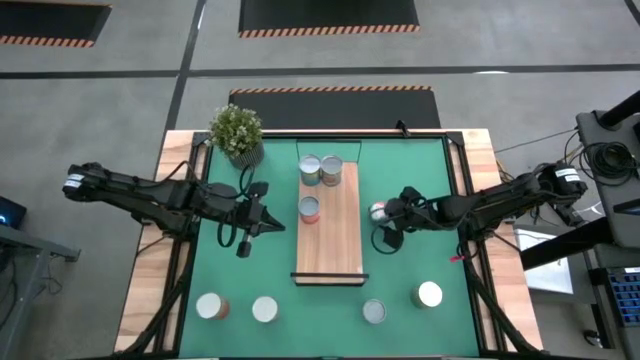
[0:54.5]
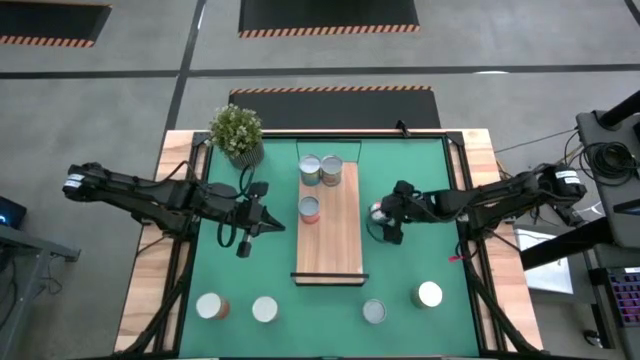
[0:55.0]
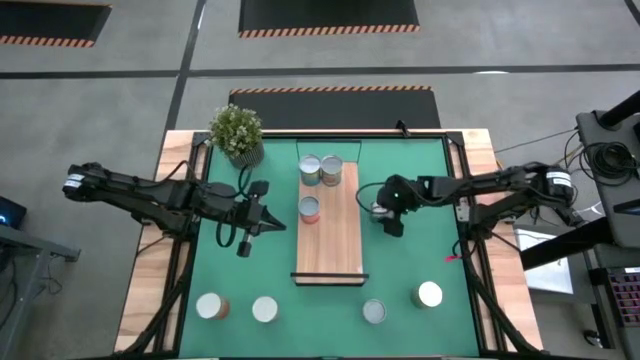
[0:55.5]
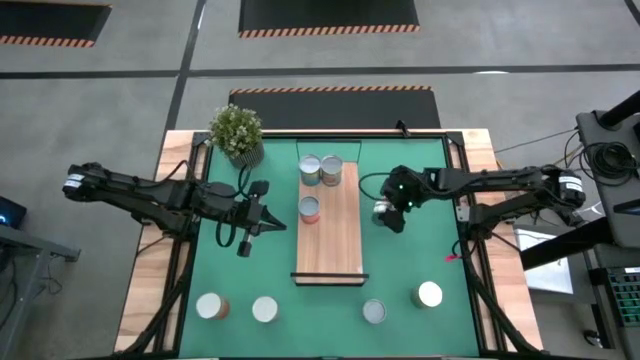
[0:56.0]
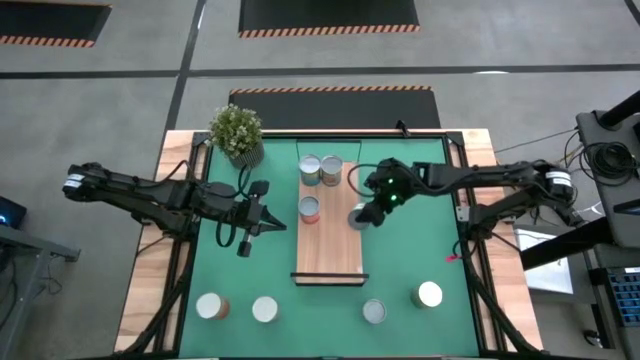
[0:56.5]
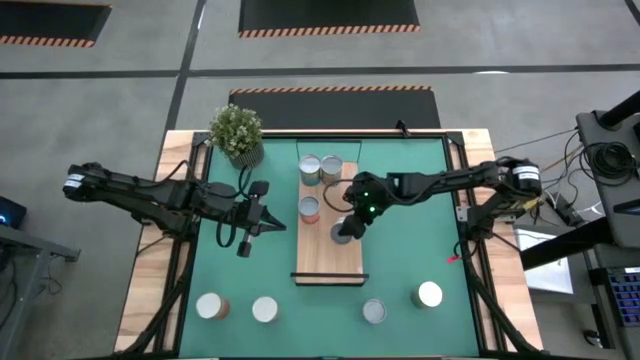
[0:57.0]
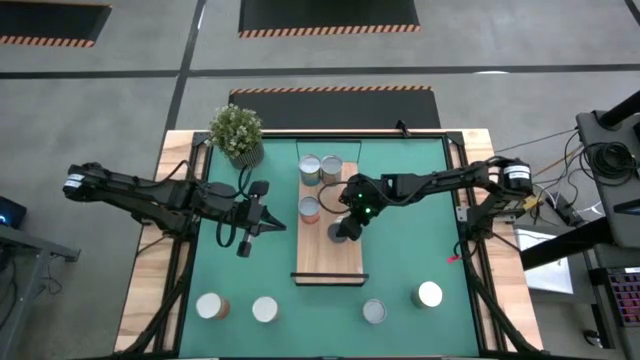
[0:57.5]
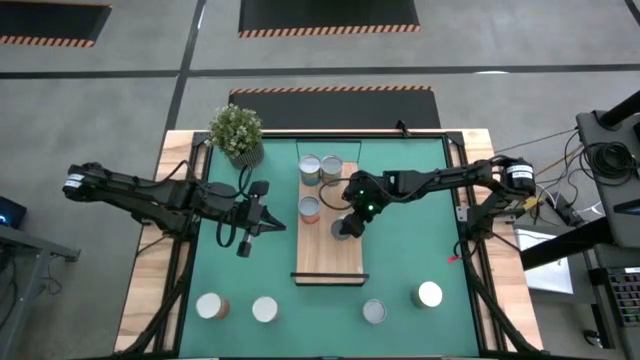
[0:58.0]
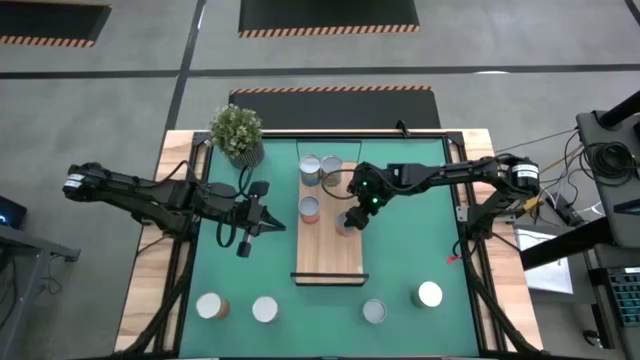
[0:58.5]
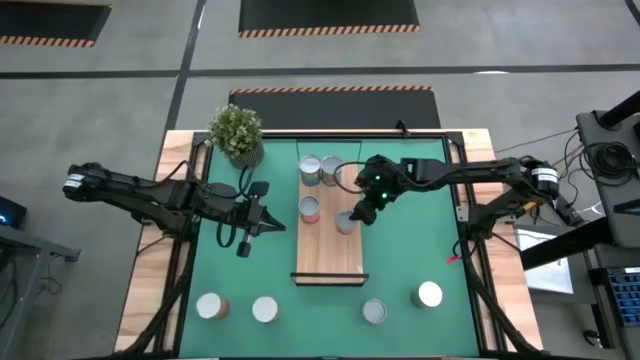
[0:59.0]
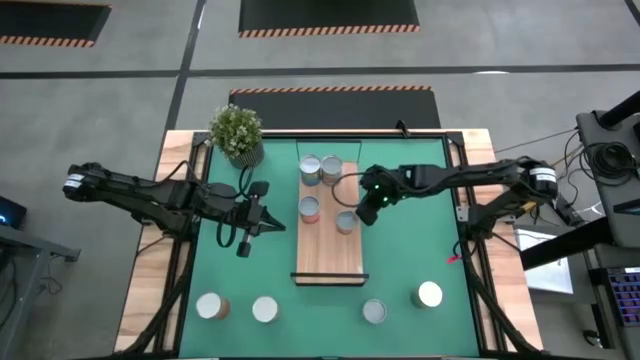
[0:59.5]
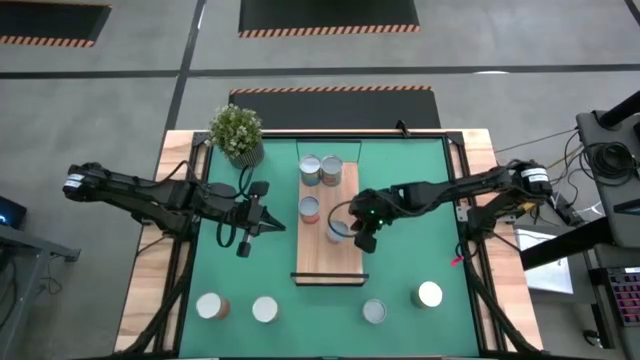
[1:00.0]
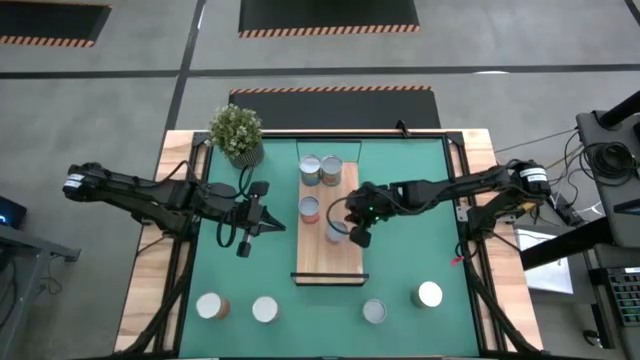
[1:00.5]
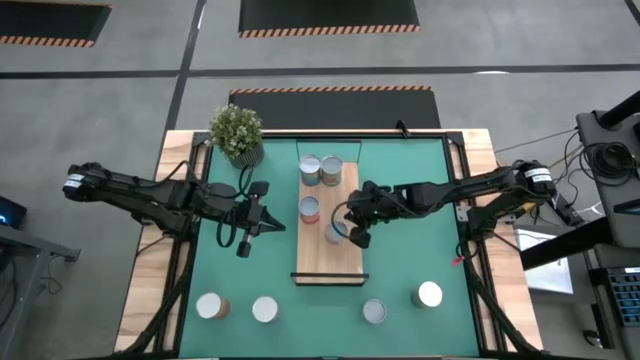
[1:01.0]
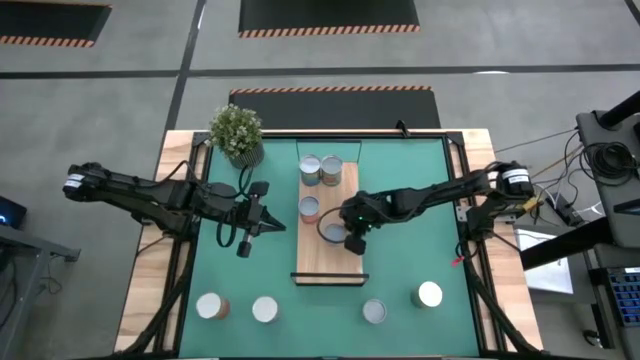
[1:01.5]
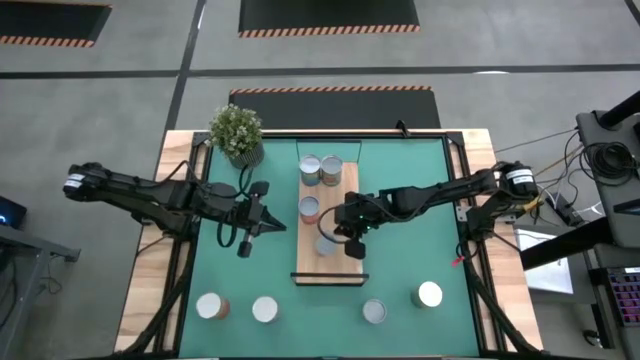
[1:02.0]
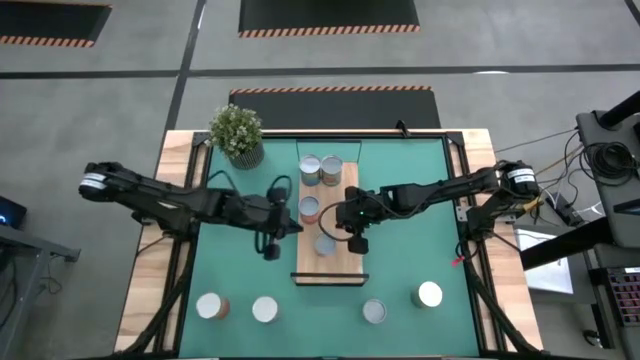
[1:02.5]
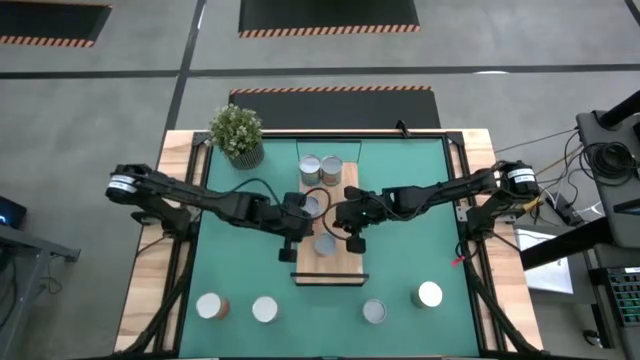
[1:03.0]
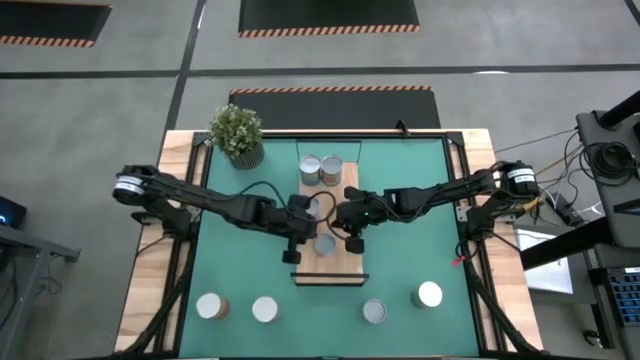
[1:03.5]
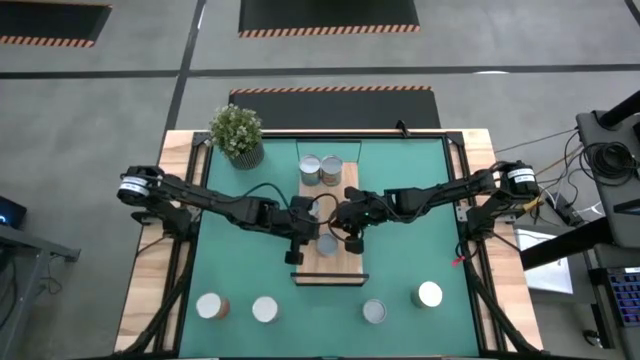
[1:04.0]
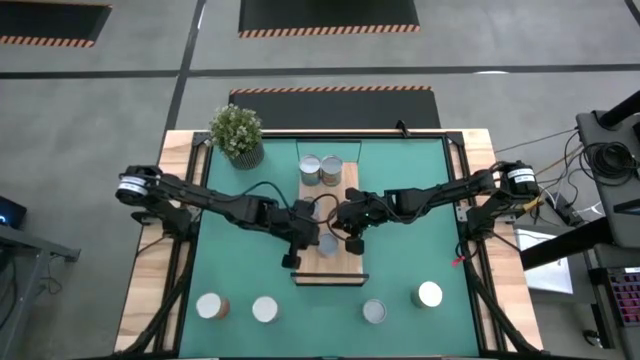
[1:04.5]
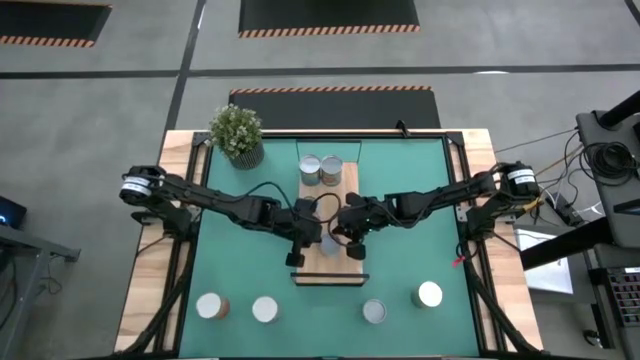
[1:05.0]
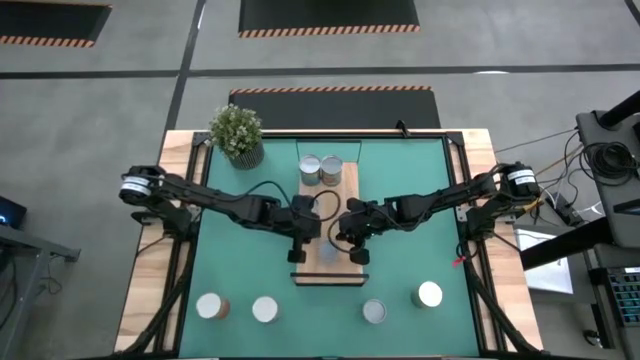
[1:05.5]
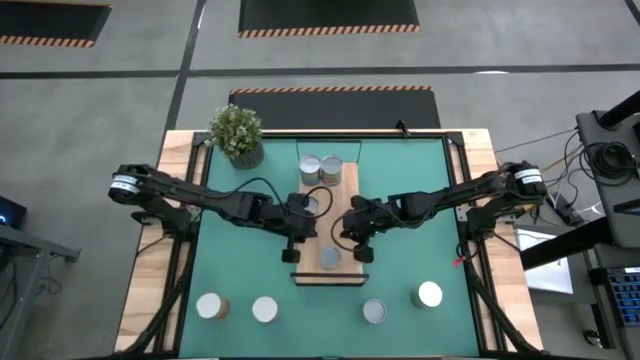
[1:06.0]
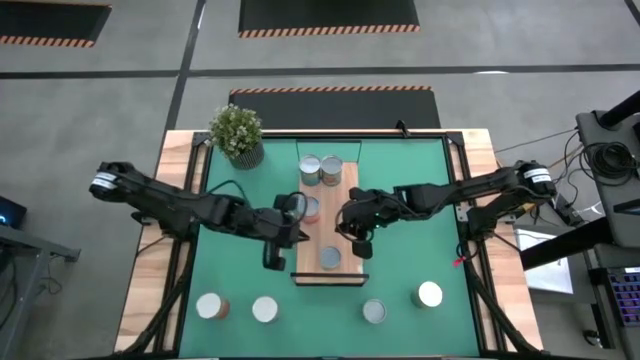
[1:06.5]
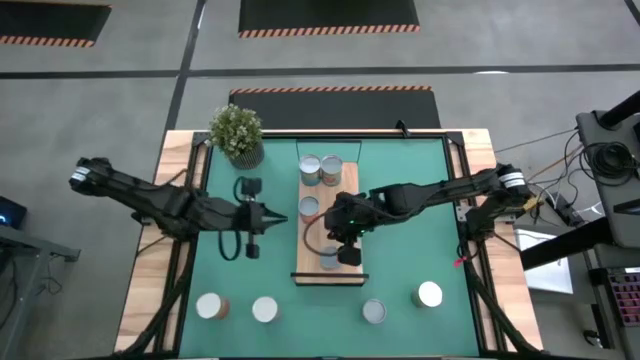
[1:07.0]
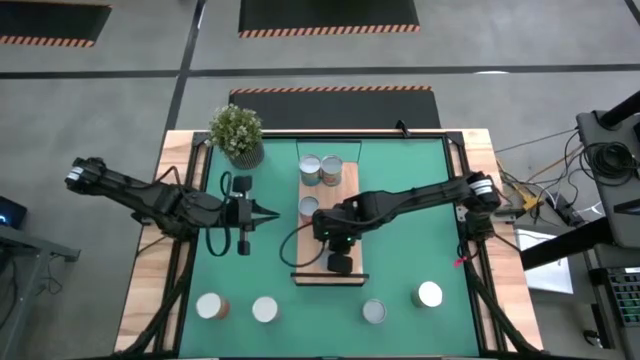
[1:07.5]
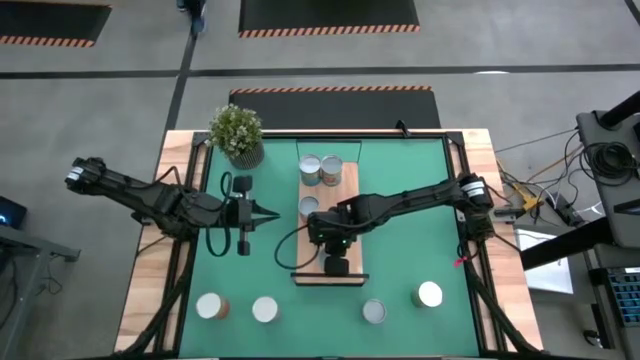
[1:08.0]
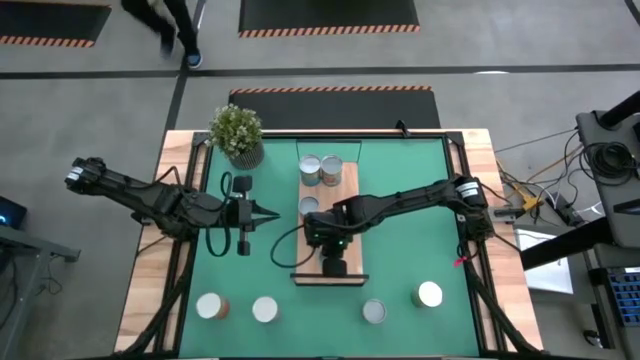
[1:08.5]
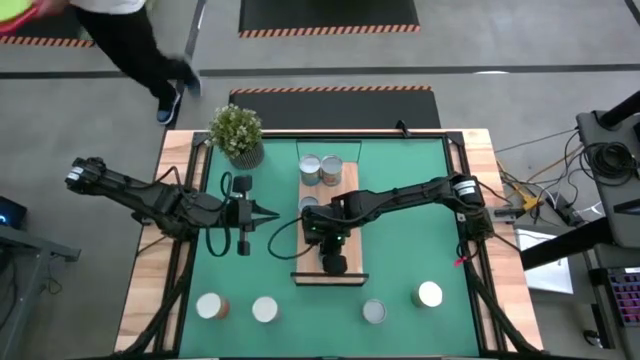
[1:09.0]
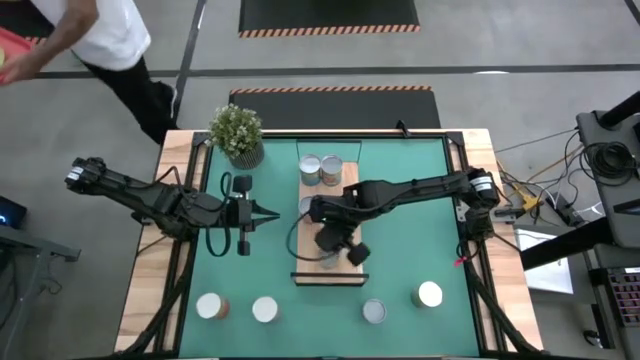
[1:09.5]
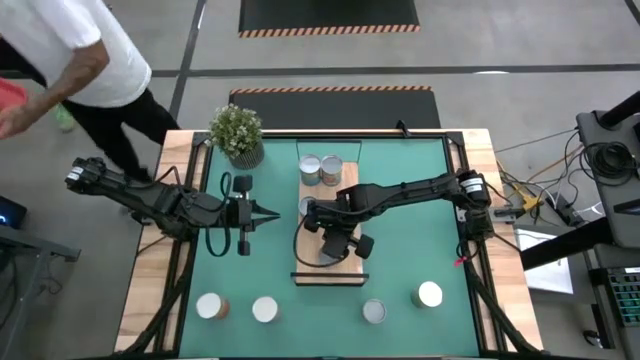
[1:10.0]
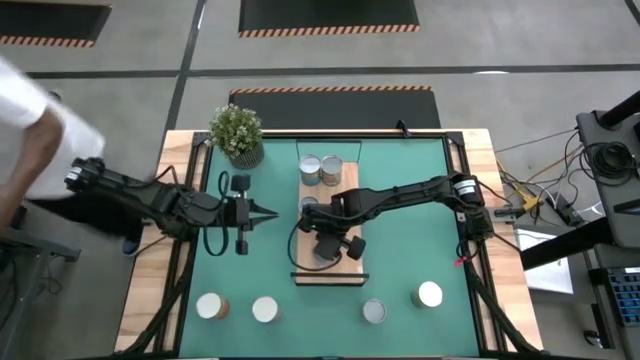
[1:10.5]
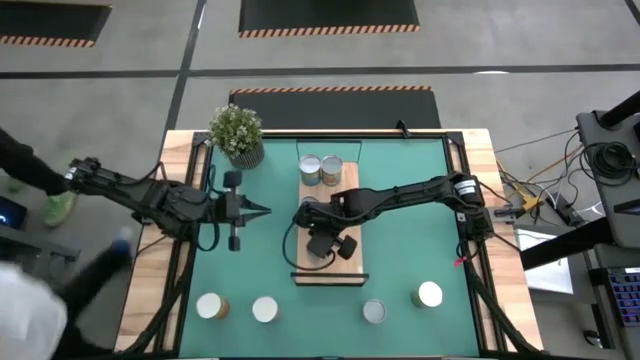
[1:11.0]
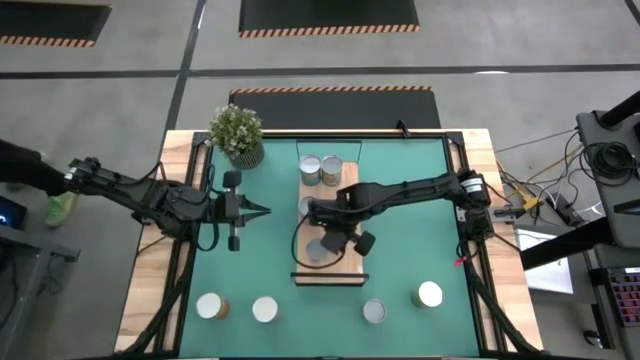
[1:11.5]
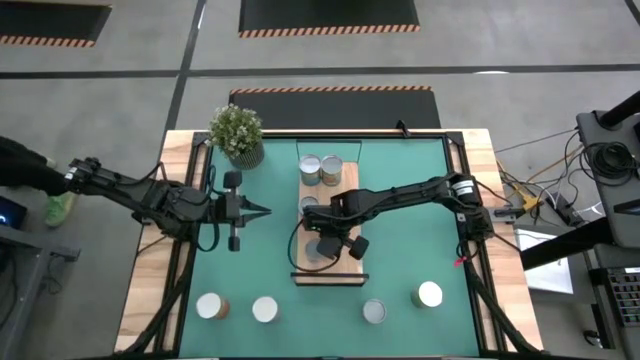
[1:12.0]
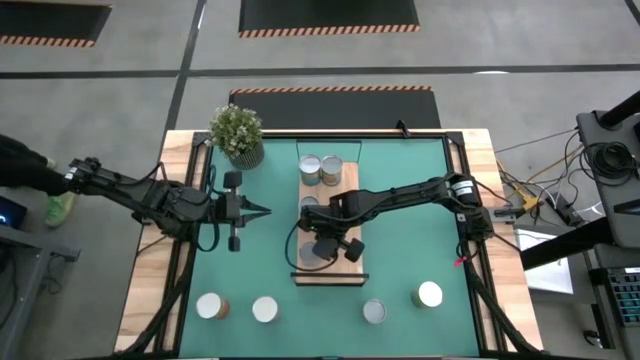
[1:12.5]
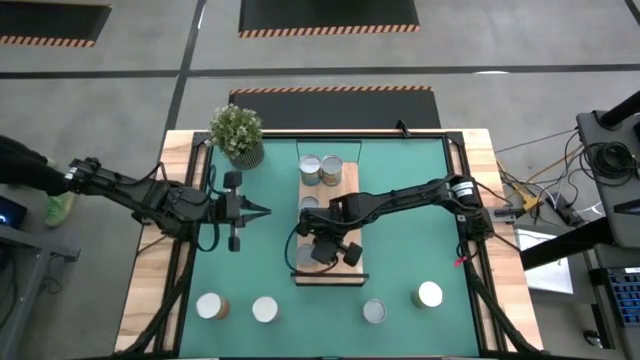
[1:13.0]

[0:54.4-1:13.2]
Task: Pick and place cans onto a shelf
Put the small canned oranges on the shelf

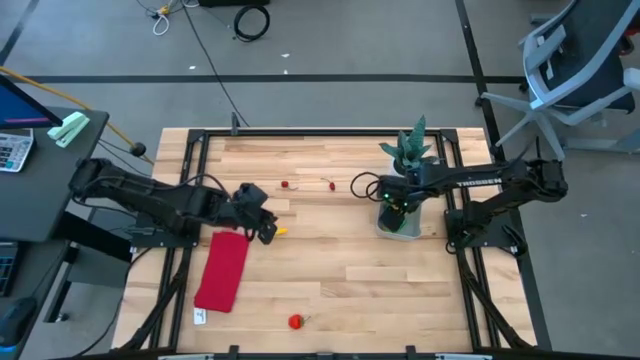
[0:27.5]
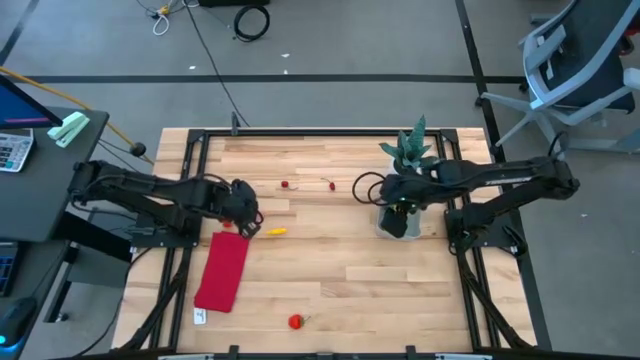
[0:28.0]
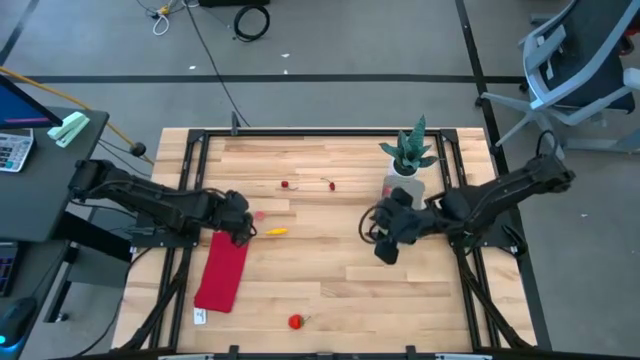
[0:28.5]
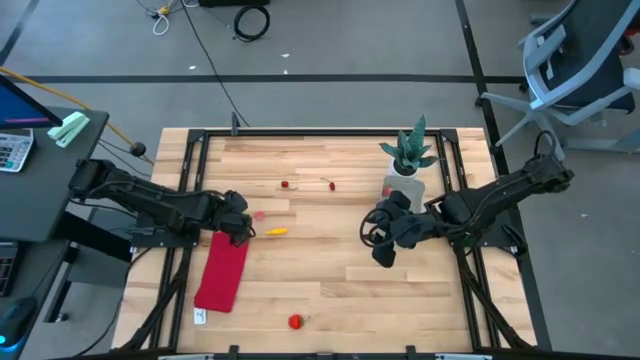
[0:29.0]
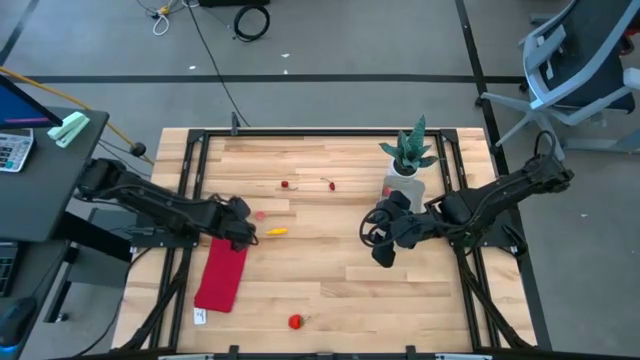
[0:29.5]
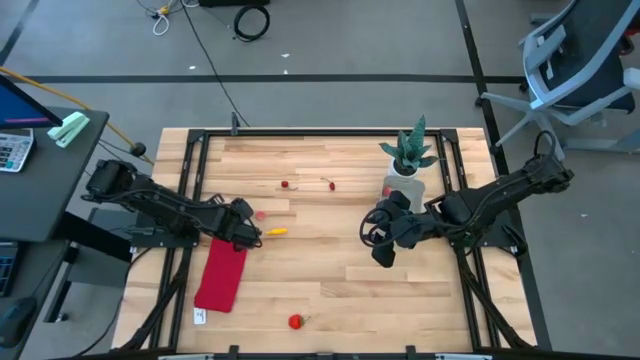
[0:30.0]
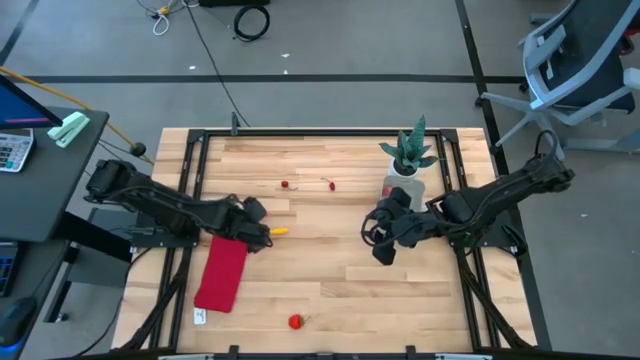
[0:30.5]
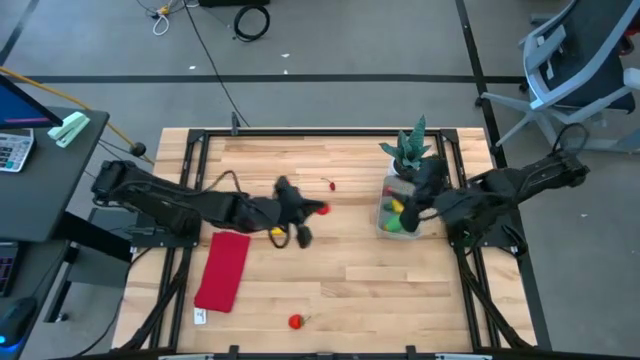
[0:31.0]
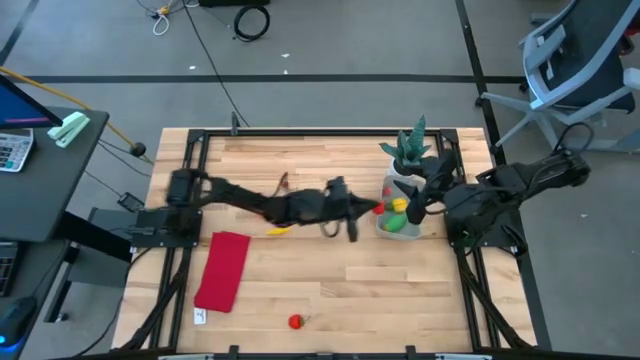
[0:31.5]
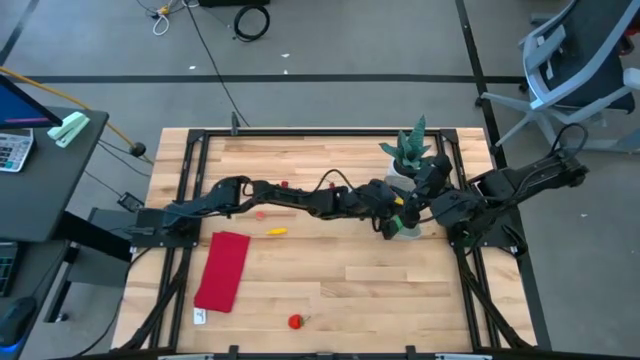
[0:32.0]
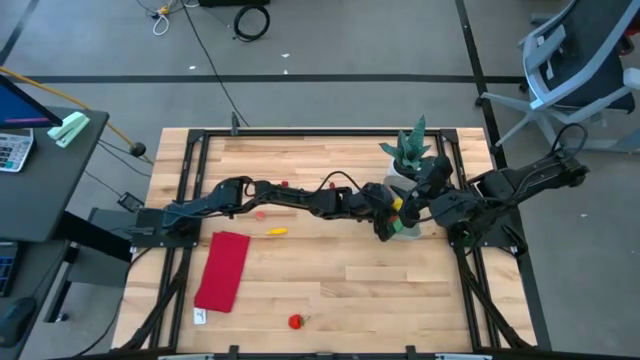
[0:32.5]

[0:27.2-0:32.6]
Task: Pick and placing Produce into tupperware
Put the top strawberry into the bin
